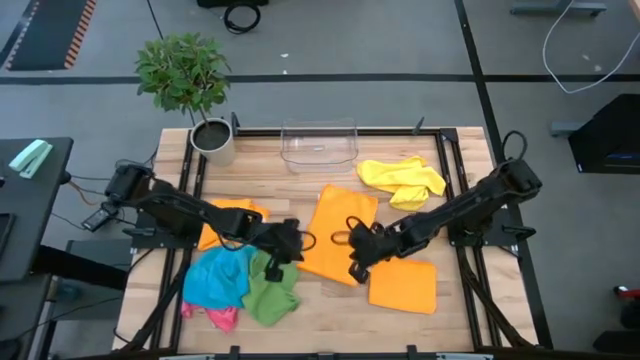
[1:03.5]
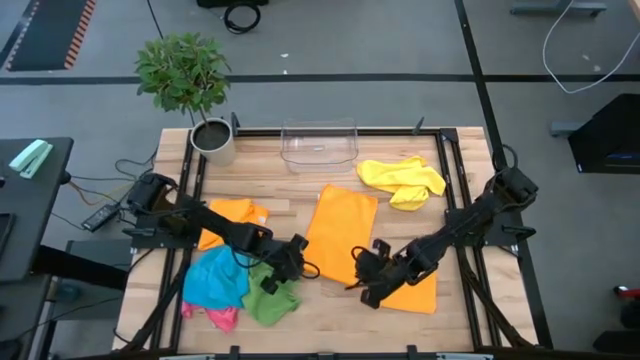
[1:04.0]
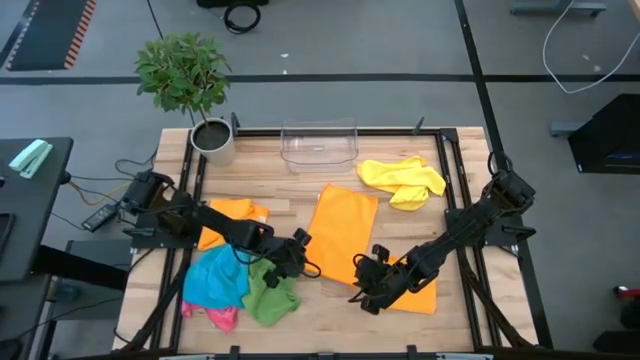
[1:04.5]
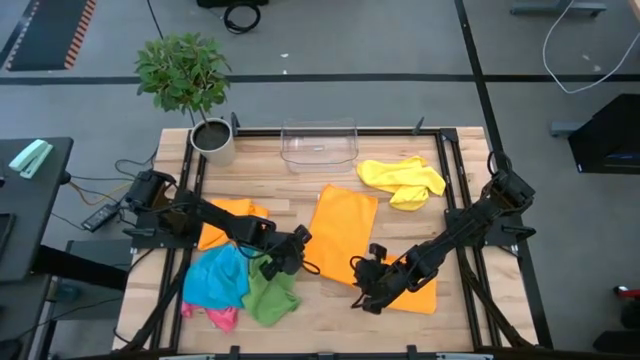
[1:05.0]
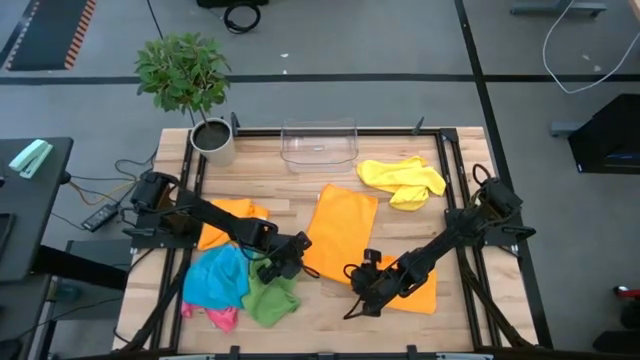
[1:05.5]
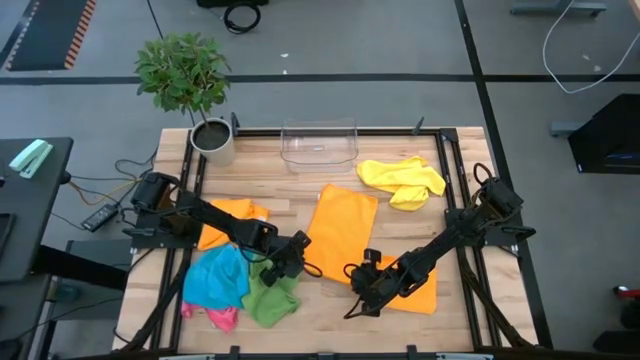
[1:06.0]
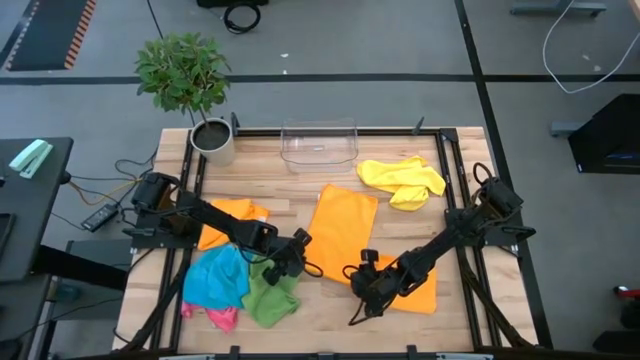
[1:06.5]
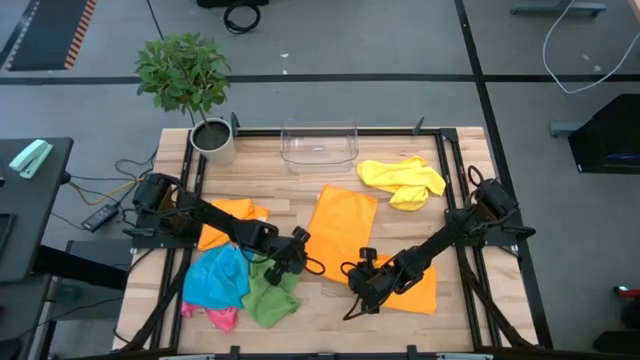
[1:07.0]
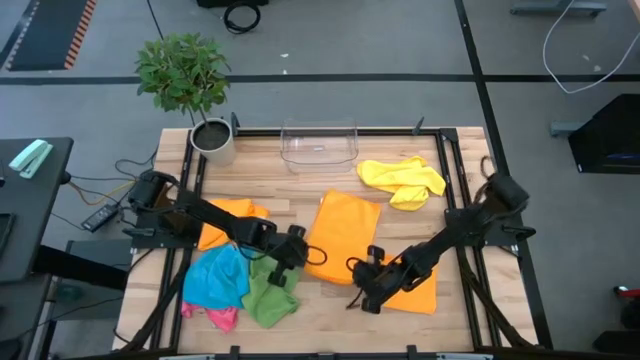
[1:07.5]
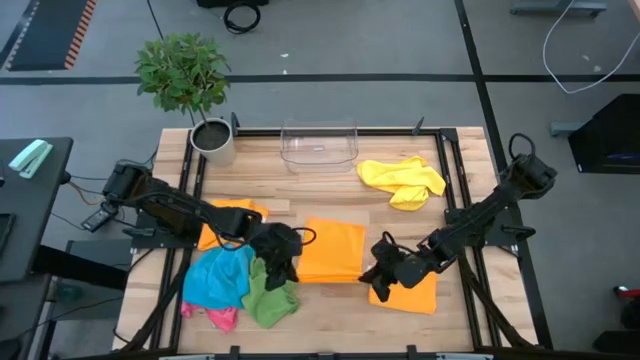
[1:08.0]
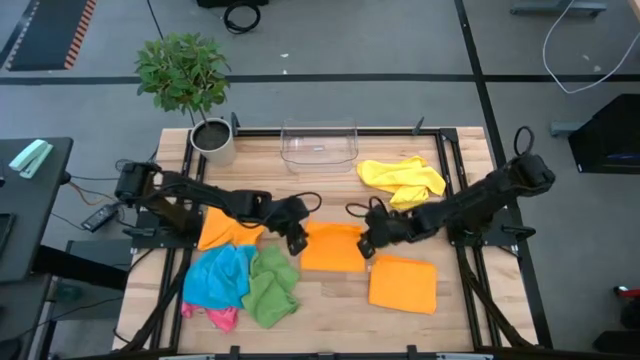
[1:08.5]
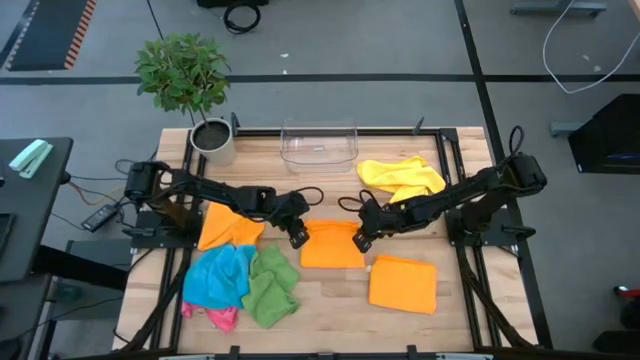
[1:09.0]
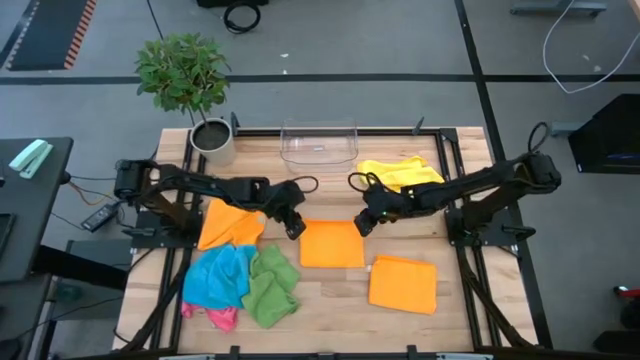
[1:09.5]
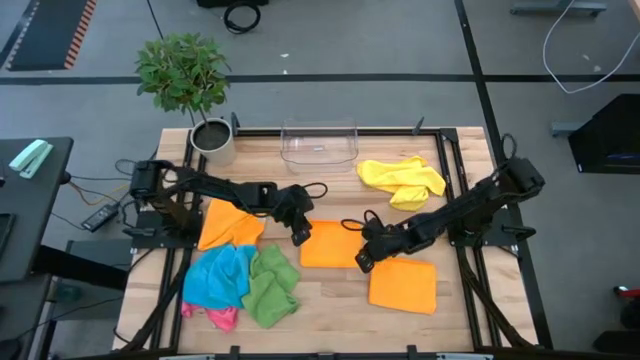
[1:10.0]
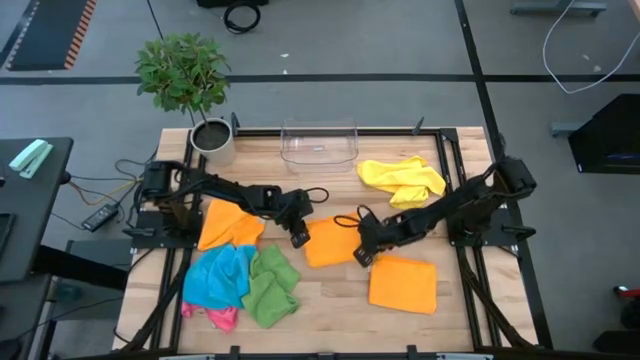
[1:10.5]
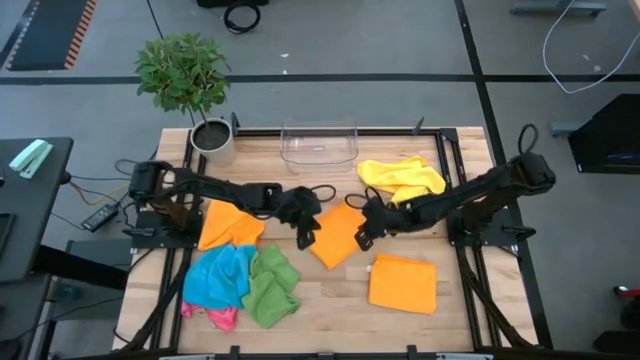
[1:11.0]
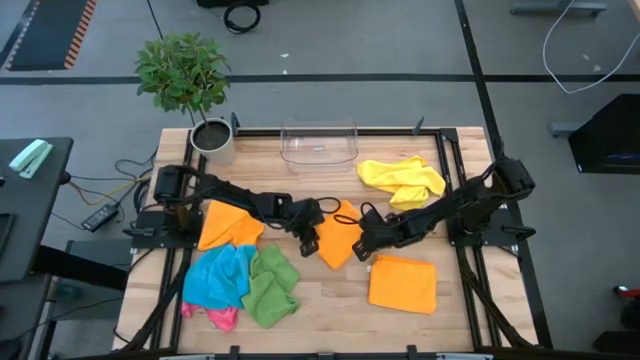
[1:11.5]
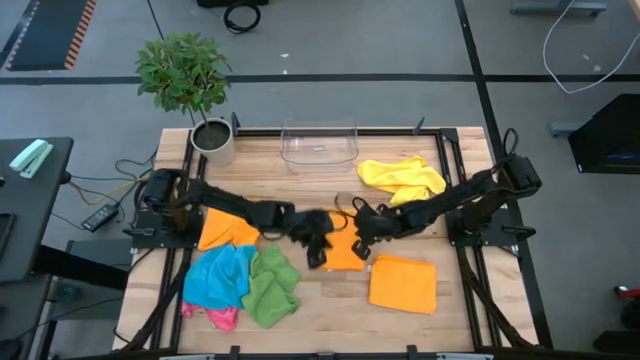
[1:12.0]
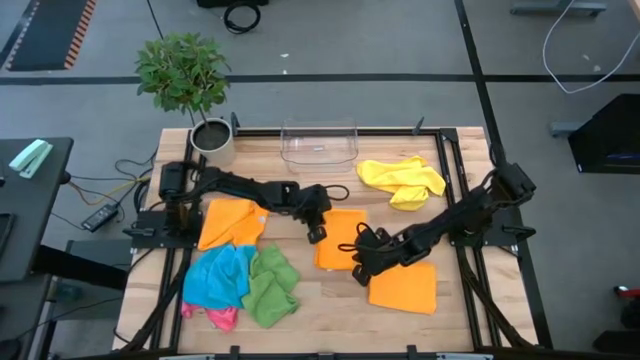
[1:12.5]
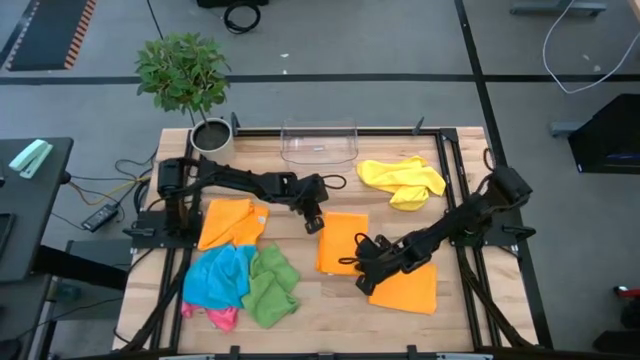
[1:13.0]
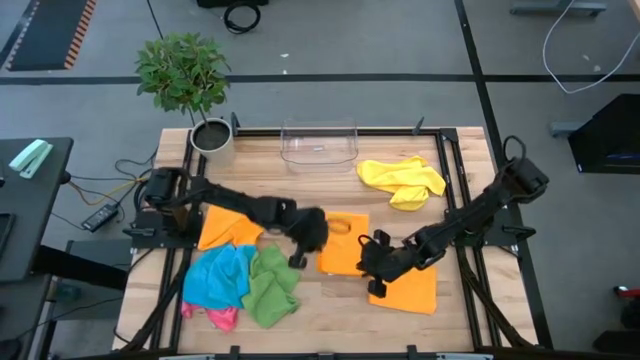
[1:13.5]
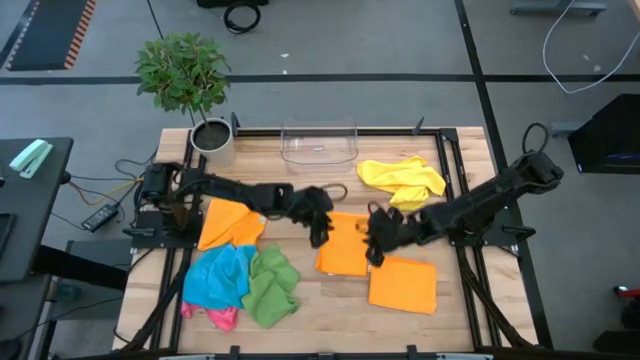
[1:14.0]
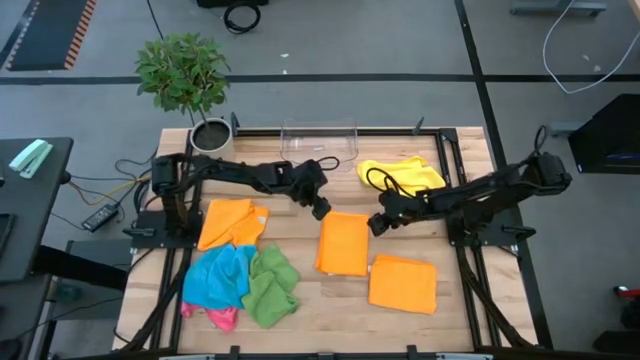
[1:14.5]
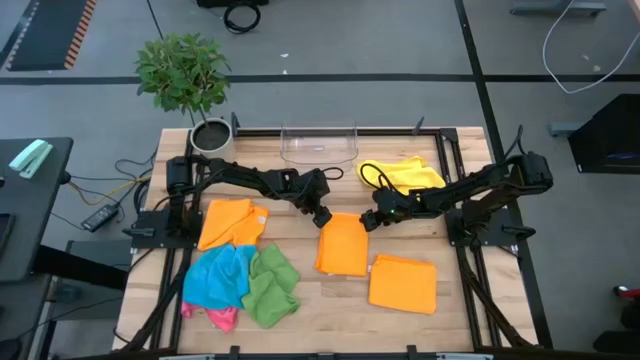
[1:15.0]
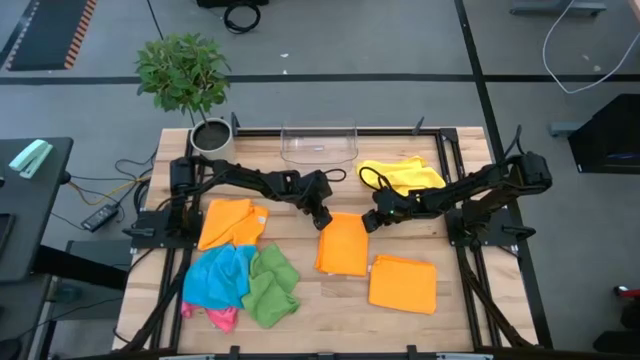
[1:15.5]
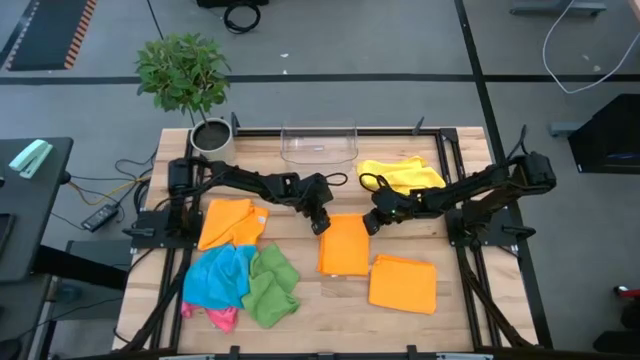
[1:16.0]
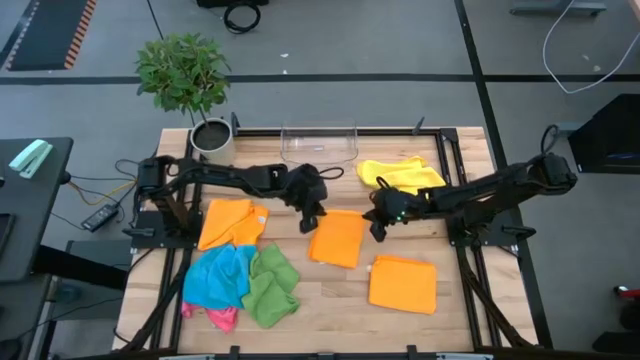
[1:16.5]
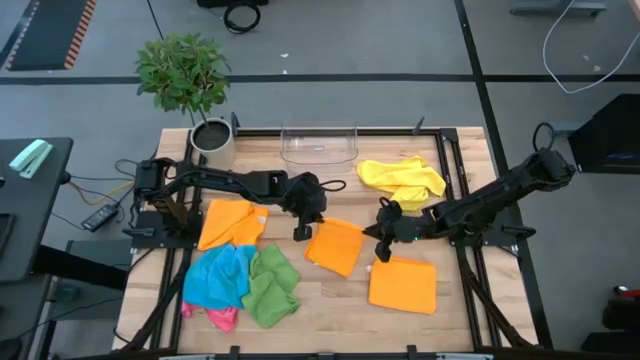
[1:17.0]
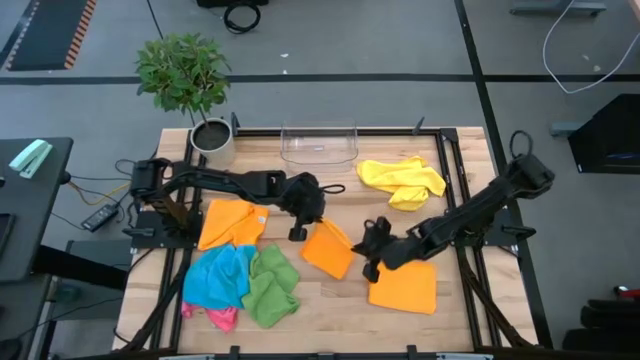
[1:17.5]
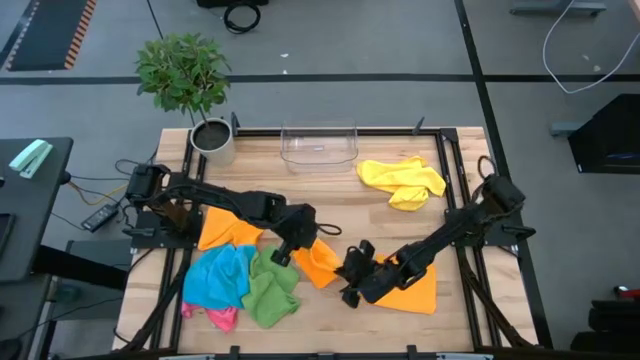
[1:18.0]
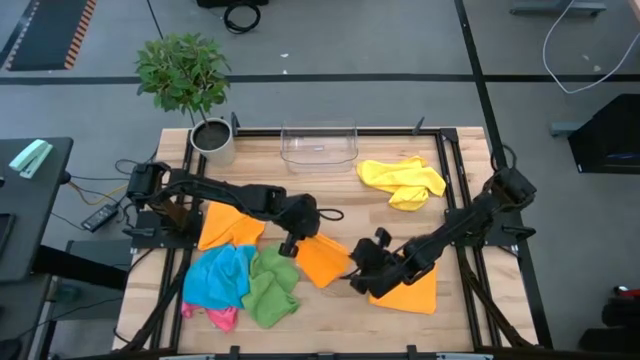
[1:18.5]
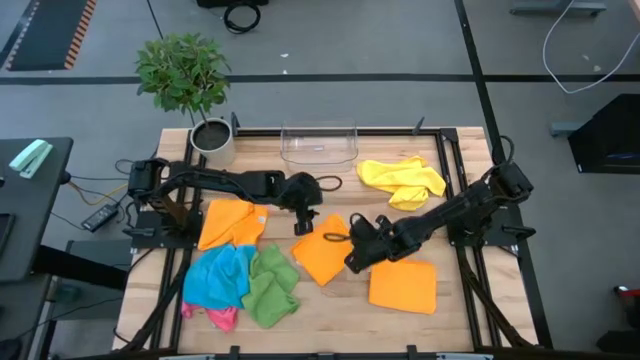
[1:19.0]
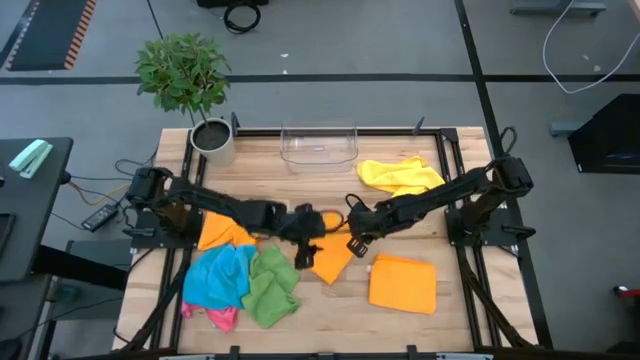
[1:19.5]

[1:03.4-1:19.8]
Task: Fold microfiber towels
Fold the middle orange towel on the table
